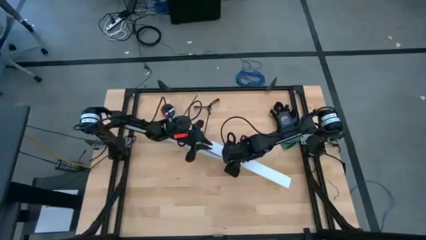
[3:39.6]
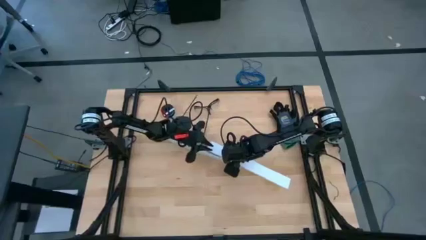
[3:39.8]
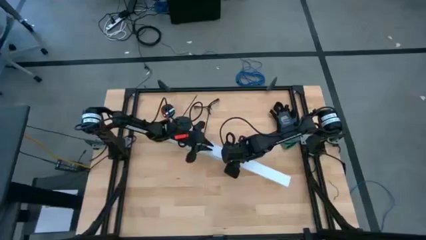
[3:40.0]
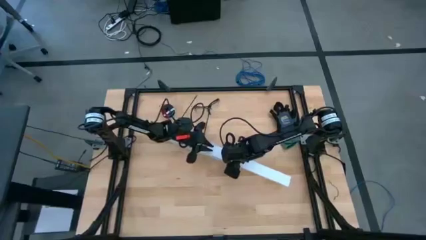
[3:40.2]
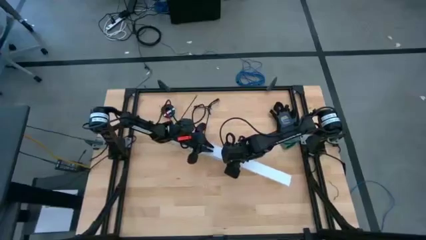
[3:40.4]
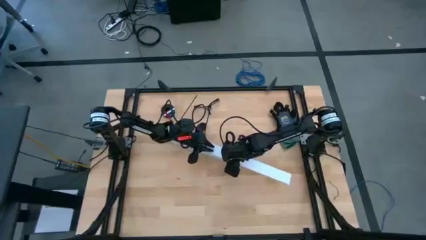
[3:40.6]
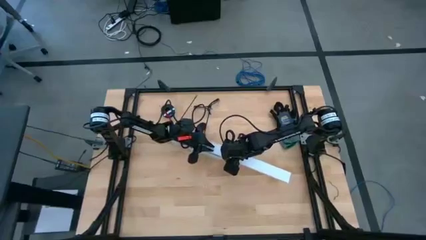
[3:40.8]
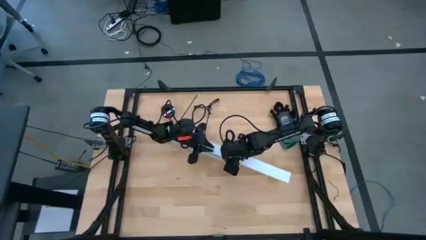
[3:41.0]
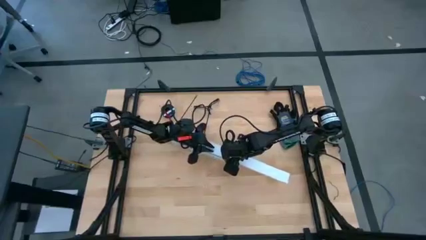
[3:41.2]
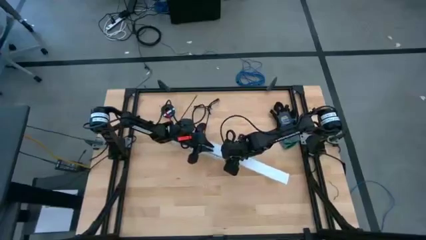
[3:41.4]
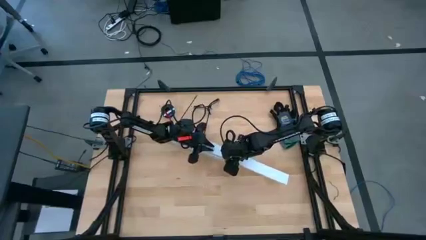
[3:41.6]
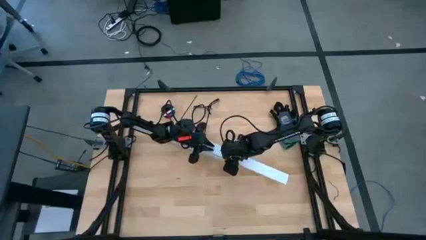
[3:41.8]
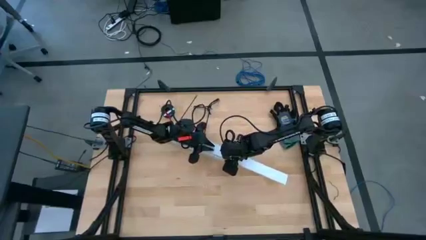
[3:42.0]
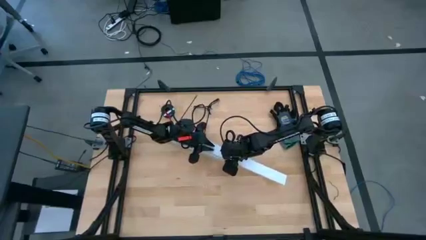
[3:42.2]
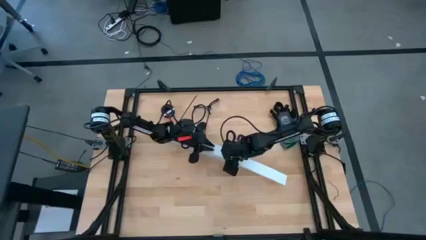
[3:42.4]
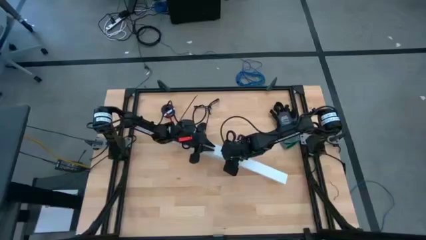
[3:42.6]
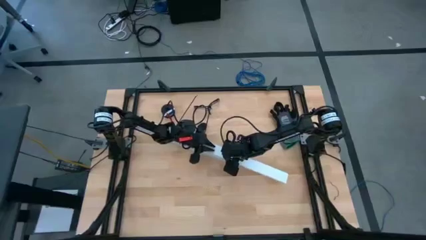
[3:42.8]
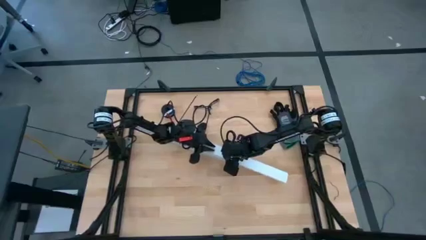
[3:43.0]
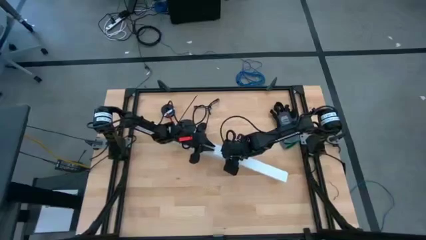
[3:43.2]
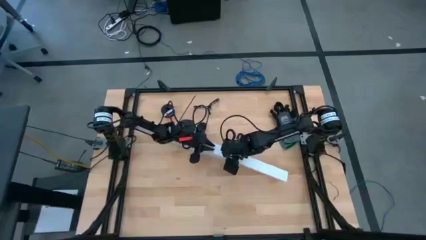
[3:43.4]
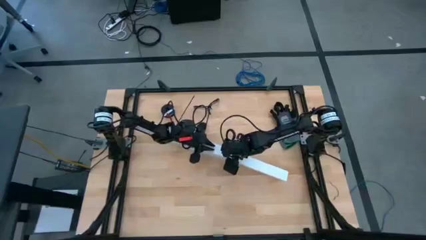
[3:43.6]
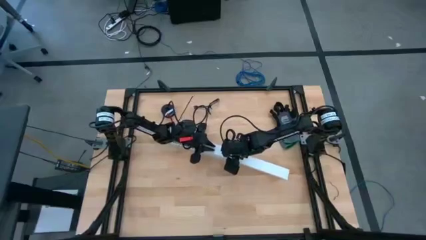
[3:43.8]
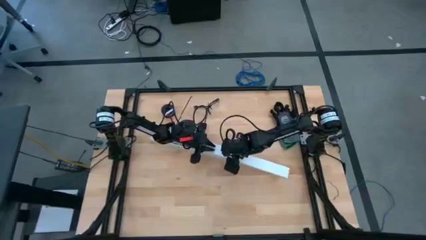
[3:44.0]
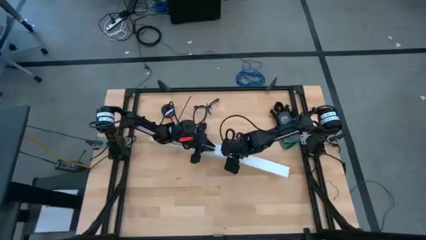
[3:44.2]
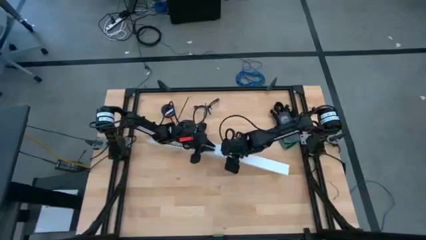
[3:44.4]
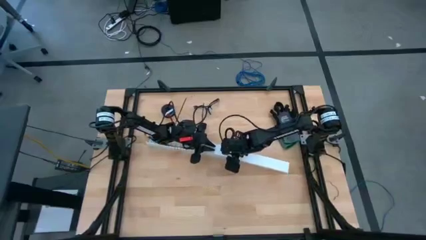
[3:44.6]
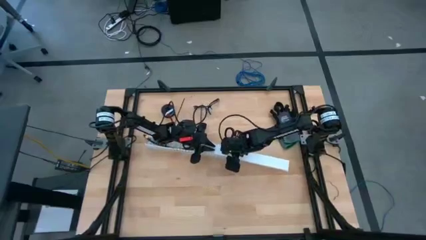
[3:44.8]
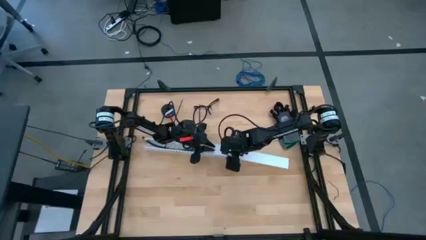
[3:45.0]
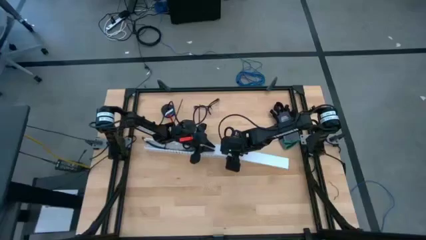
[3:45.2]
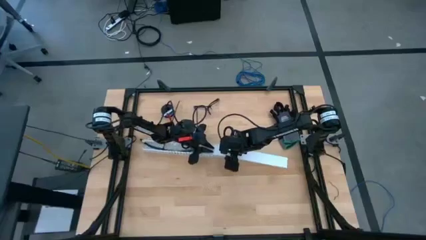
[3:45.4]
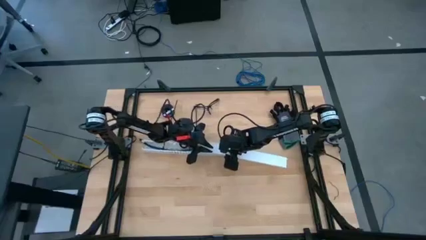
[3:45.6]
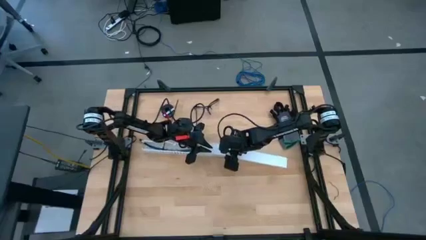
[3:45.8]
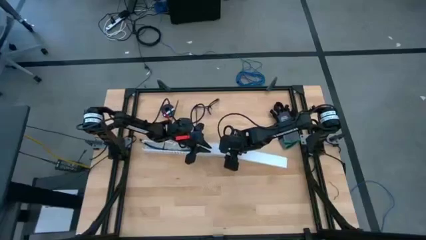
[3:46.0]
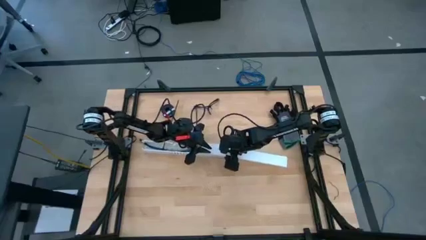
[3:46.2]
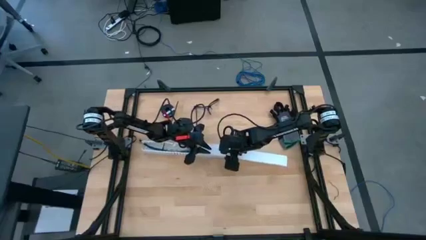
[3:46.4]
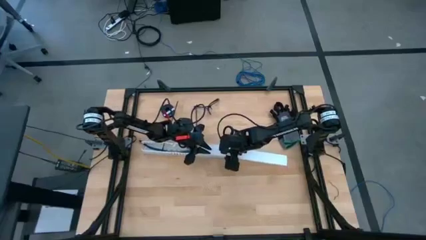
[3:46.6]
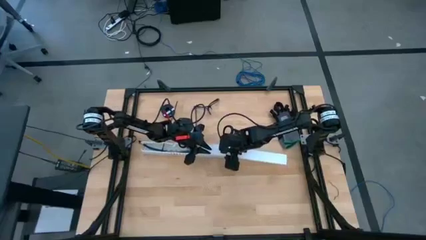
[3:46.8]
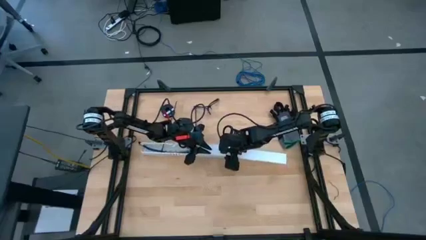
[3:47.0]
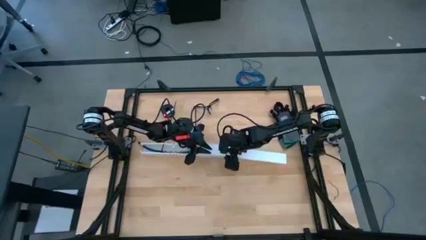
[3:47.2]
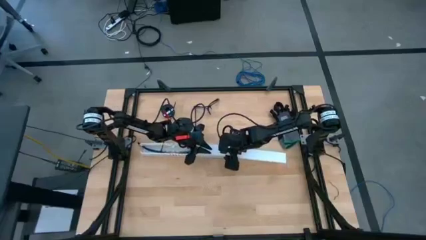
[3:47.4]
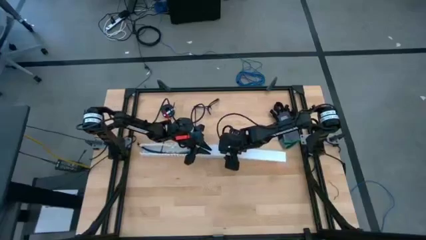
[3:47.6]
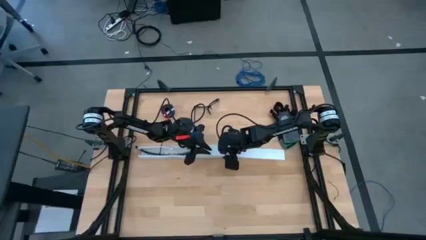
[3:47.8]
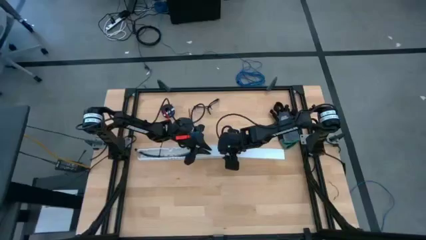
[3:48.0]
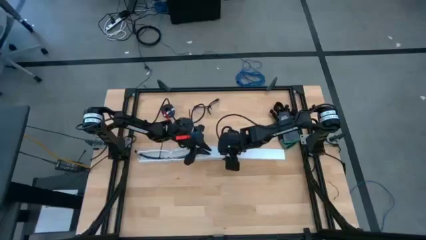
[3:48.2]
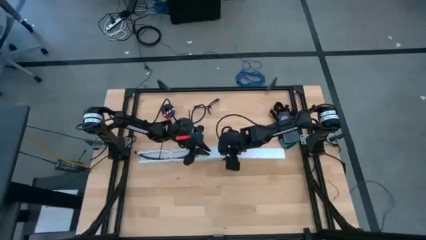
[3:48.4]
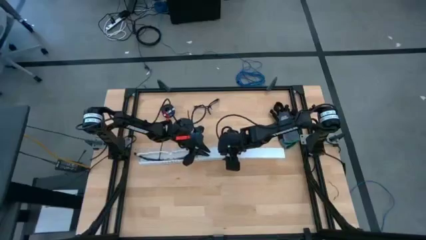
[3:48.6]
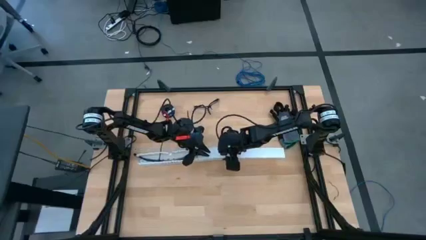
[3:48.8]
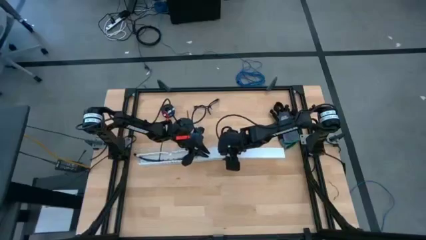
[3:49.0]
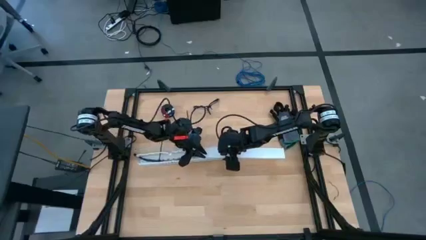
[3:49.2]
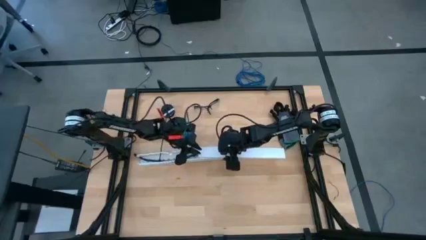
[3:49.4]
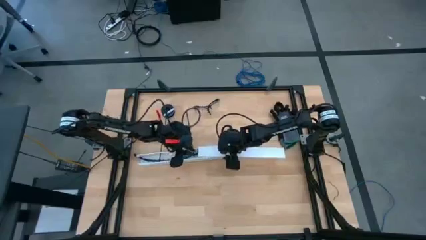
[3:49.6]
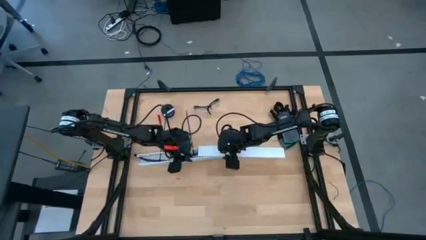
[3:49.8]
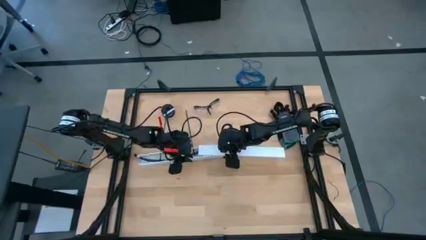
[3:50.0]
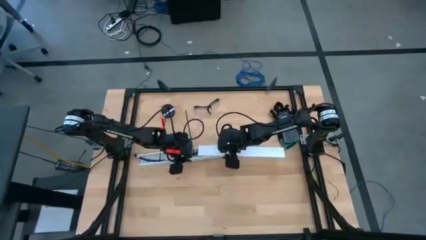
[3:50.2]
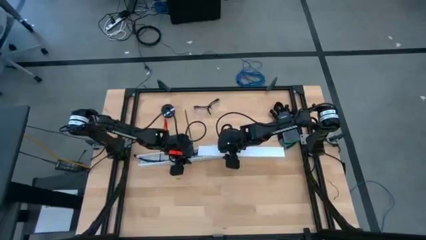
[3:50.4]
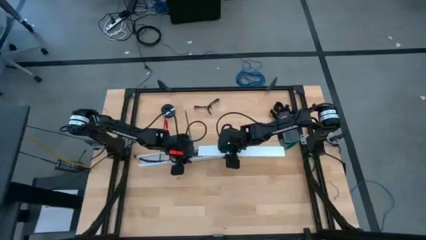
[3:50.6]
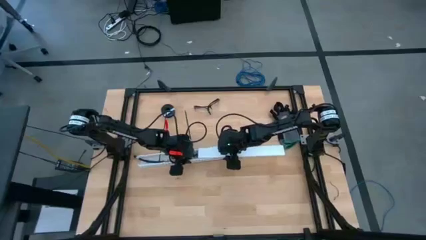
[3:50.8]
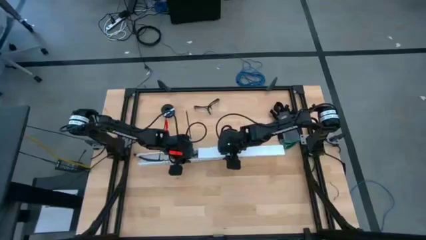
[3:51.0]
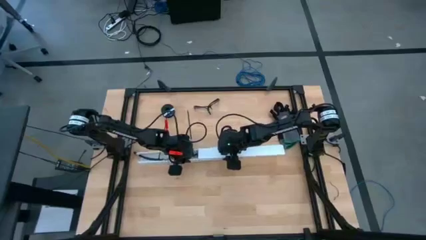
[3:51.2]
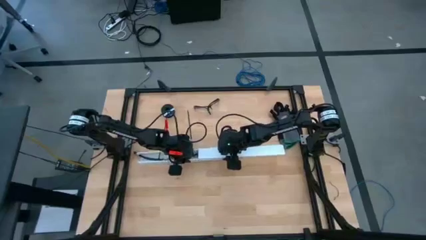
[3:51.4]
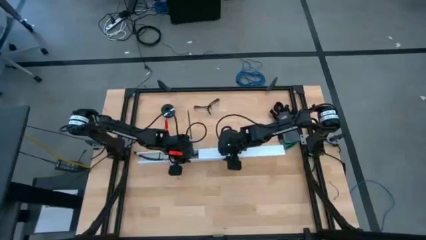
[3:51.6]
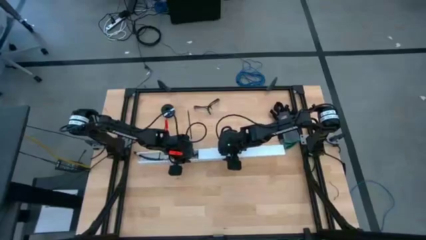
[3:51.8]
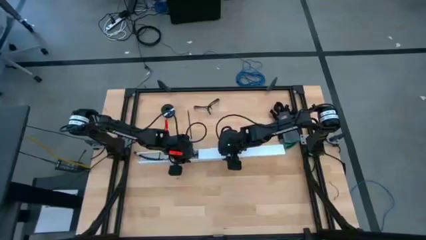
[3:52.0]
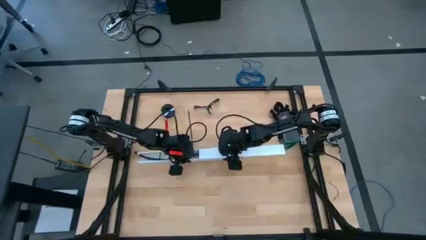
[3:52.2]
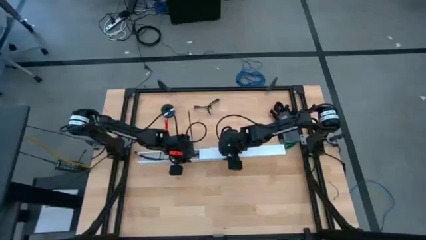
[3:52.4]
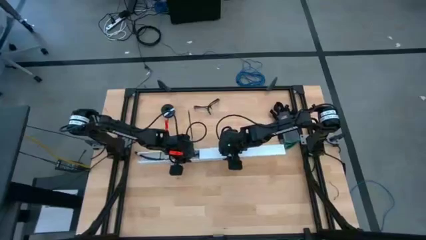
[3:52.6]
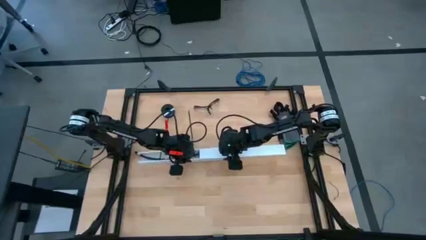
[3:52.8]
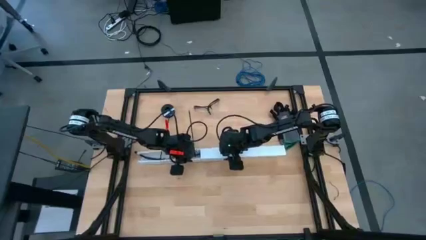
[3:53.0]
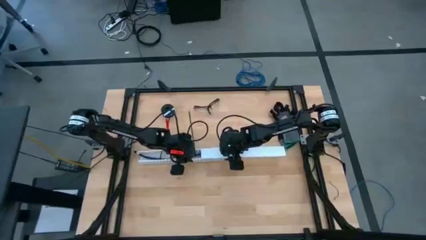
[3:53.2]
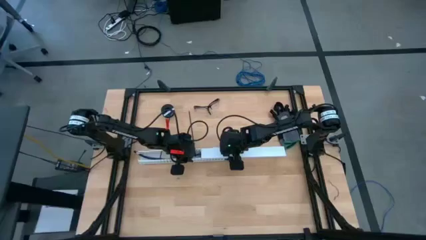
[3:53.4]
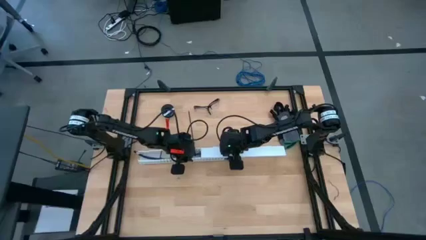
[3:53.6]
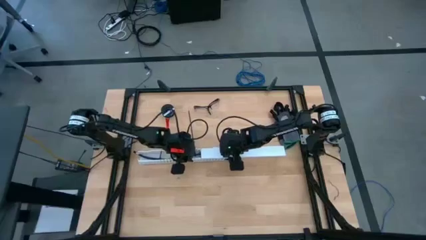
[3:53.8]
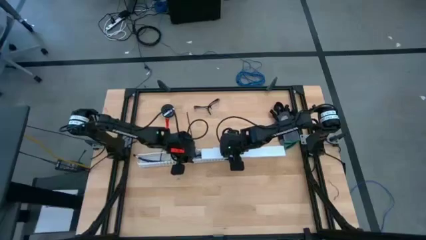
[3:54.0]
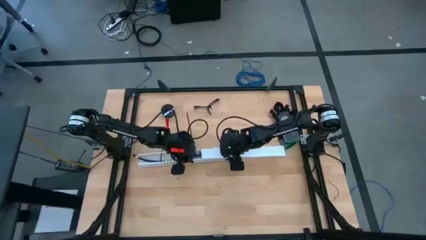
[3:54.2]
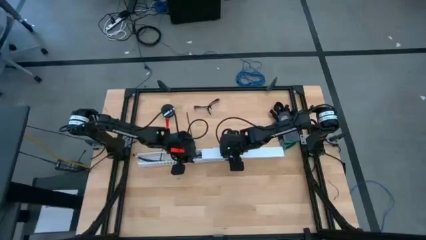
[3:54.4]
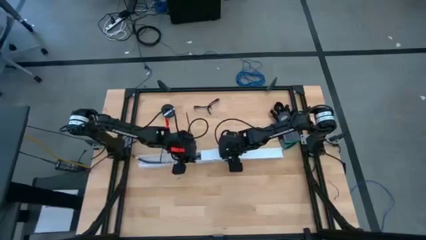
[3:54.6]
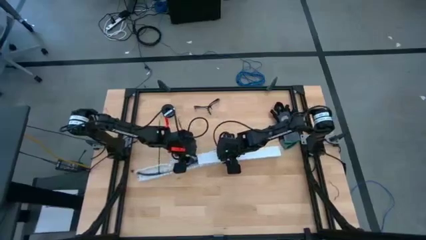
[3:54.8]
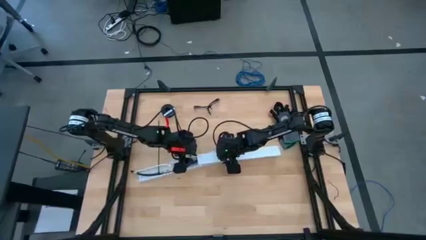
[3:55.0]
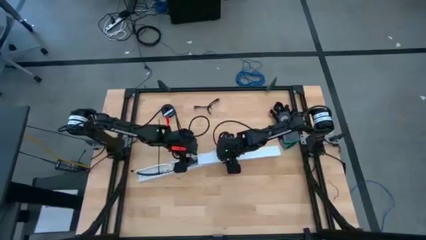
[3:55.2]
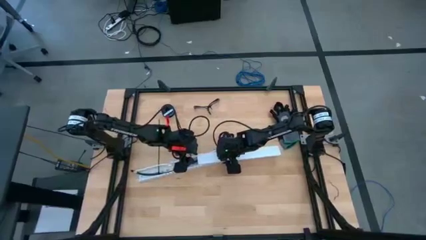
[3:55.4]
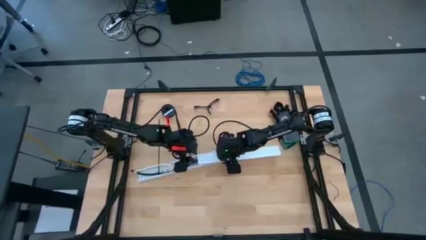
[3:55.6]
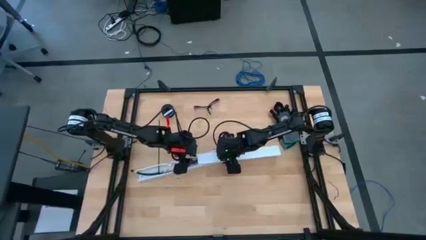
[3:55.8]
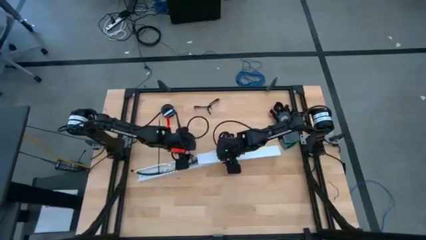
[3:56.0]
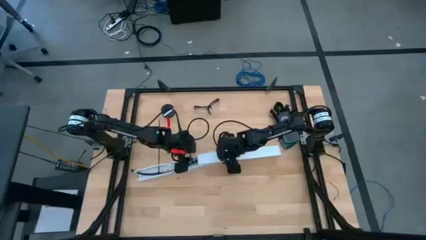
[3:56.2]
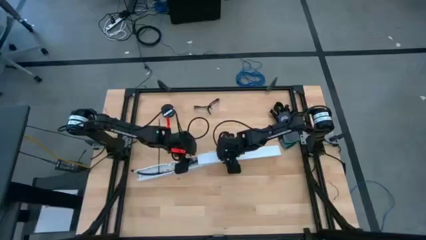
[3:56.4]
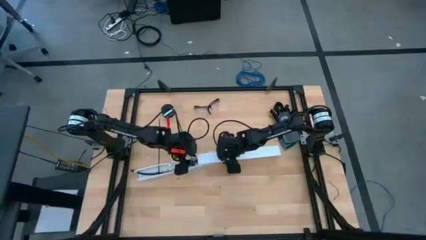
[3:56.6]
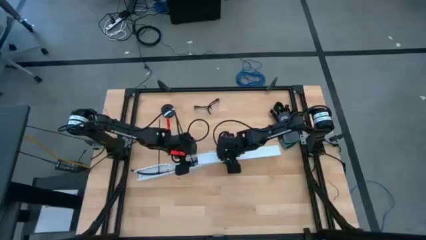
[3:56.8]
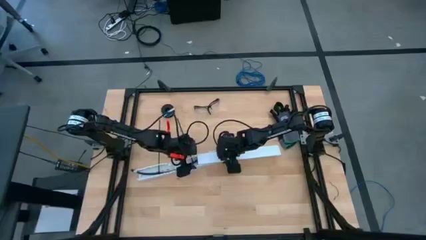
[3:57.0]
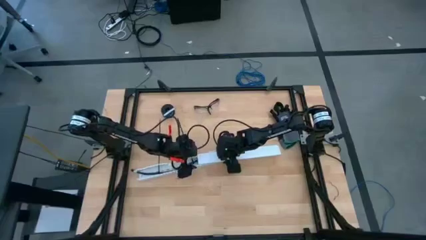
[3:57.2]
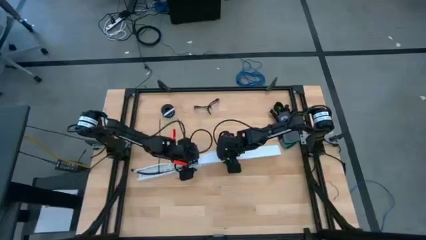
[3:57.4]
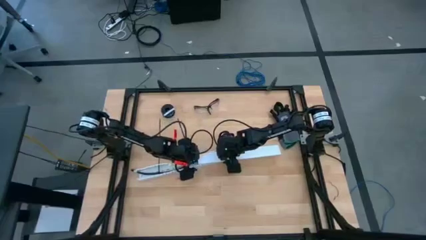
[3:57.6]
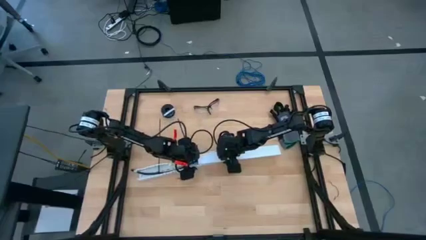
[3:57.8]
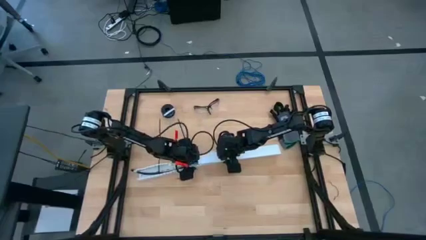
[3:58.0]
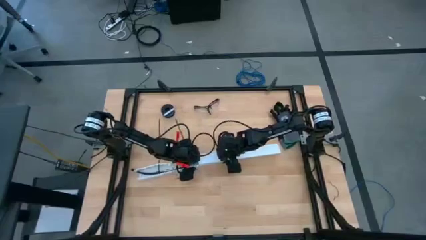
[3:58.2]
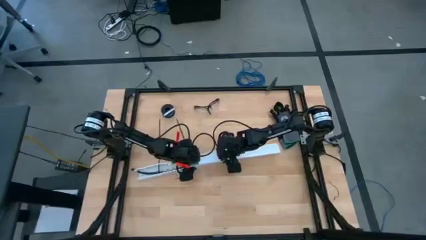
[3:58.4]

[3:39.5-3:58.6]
Task: Ziptie cables
Close the white cable duct
